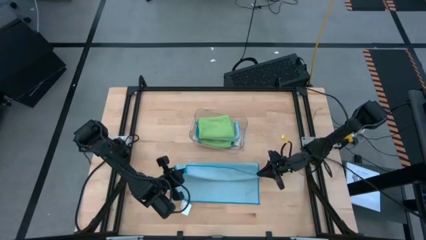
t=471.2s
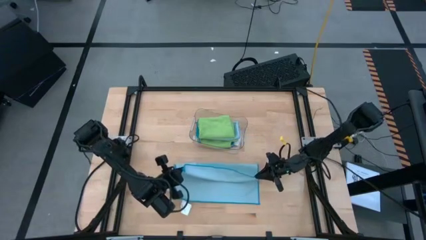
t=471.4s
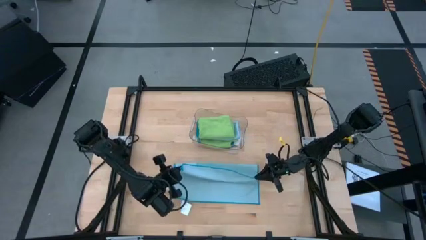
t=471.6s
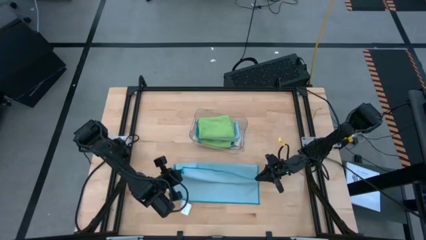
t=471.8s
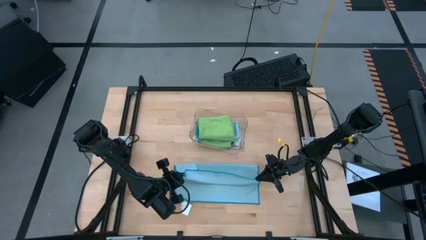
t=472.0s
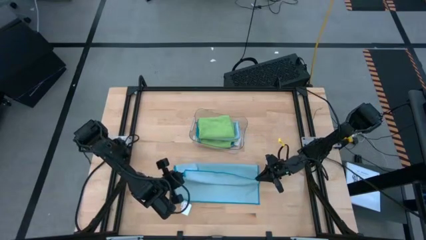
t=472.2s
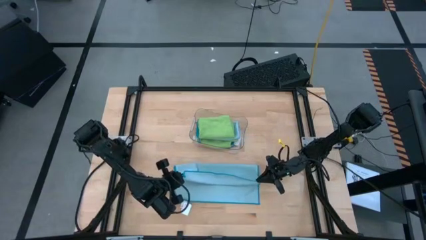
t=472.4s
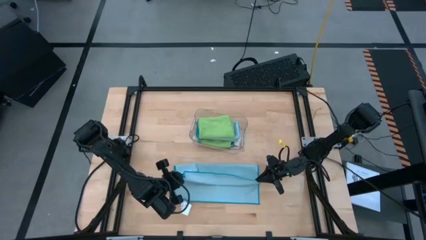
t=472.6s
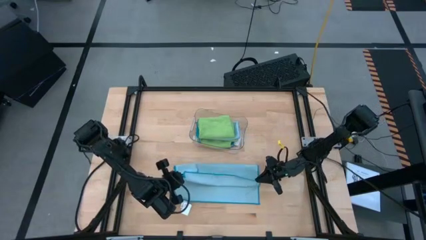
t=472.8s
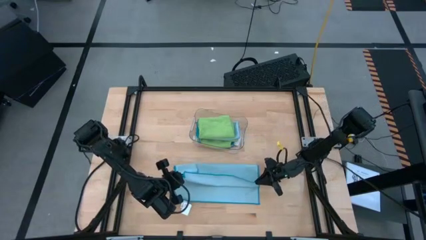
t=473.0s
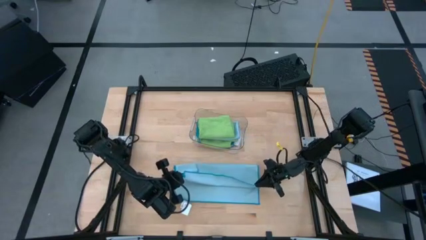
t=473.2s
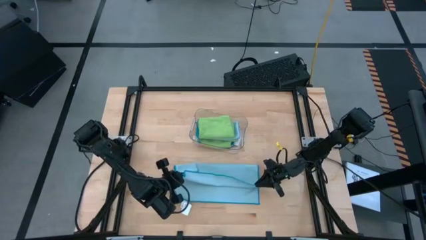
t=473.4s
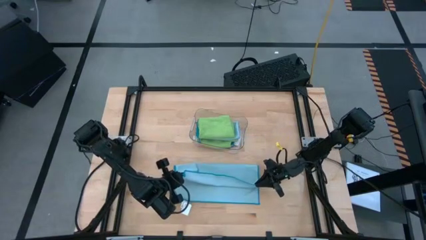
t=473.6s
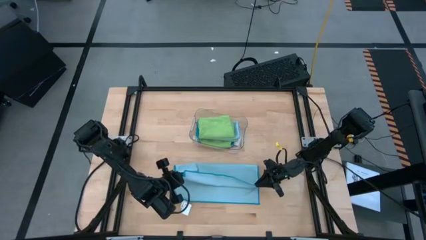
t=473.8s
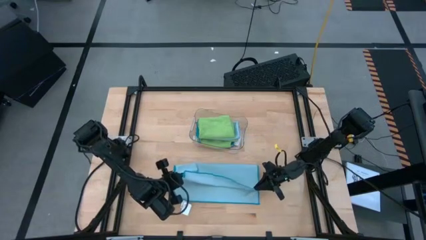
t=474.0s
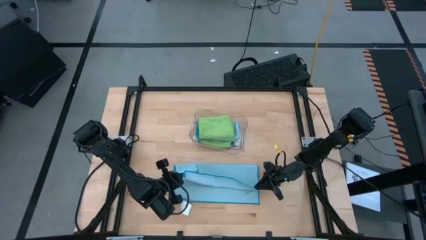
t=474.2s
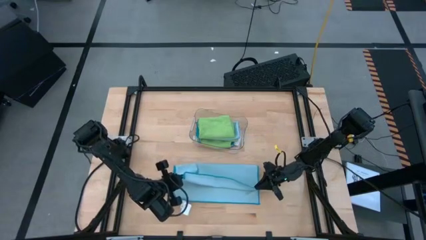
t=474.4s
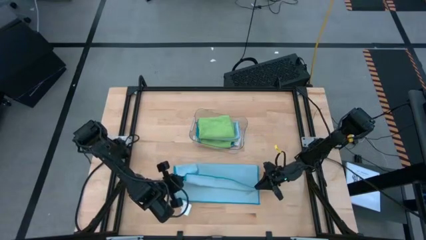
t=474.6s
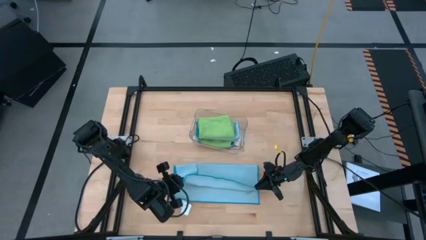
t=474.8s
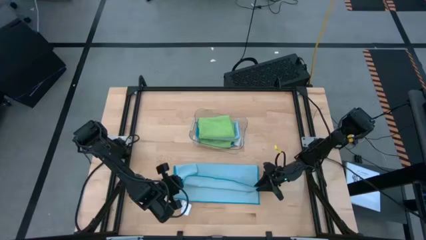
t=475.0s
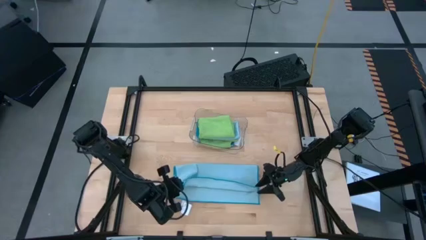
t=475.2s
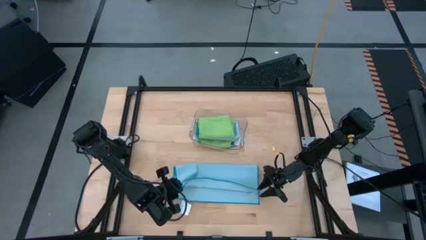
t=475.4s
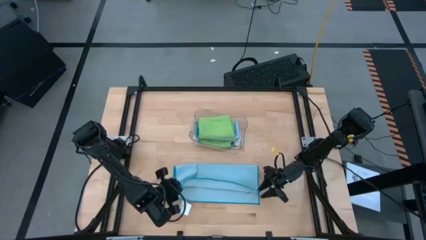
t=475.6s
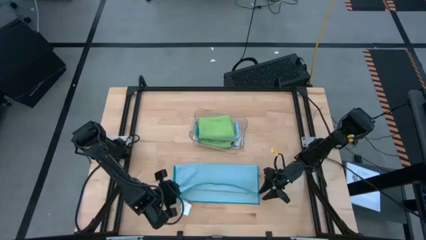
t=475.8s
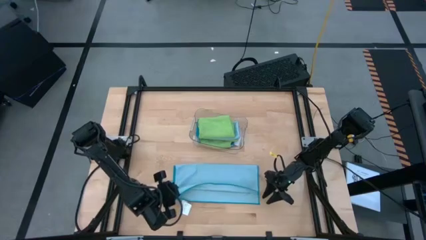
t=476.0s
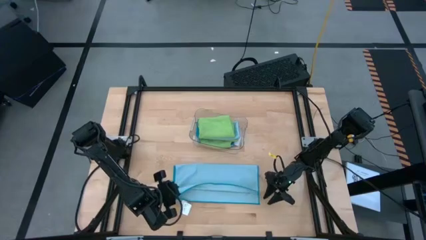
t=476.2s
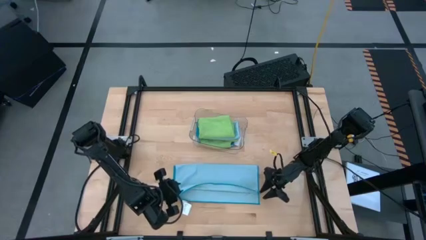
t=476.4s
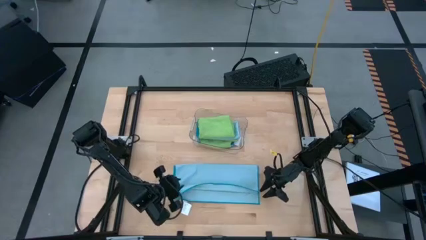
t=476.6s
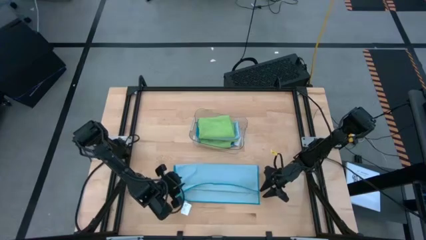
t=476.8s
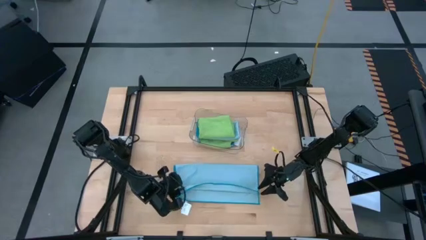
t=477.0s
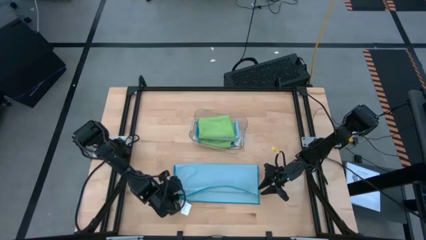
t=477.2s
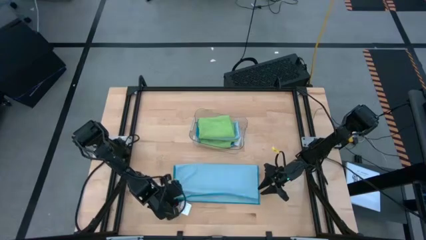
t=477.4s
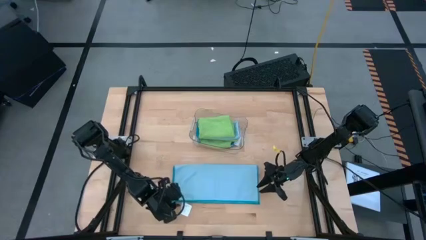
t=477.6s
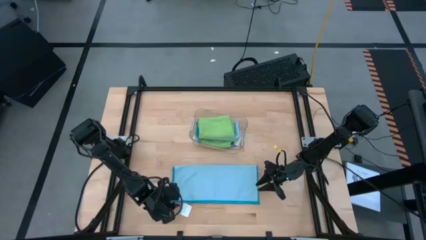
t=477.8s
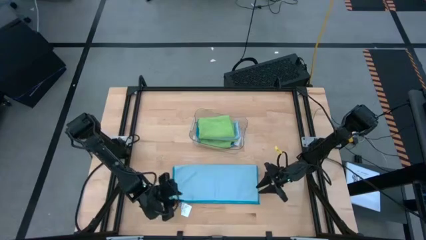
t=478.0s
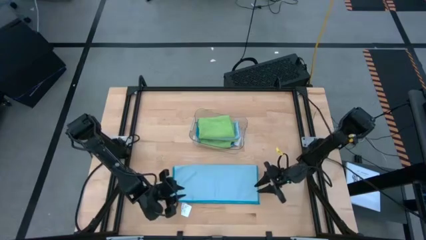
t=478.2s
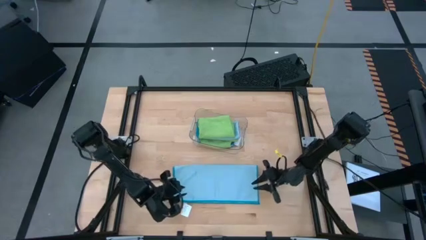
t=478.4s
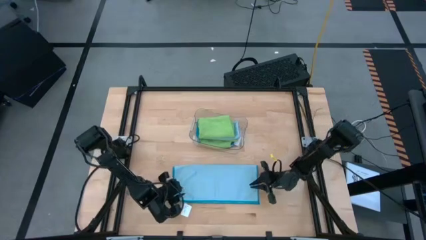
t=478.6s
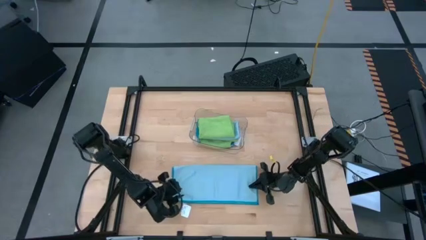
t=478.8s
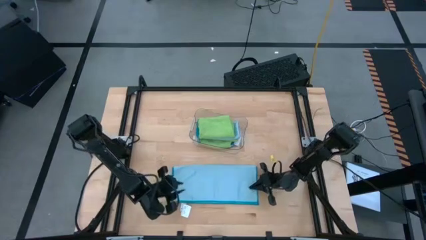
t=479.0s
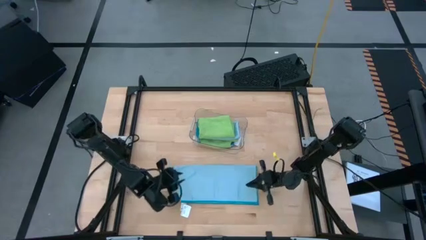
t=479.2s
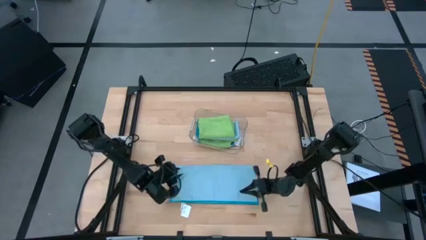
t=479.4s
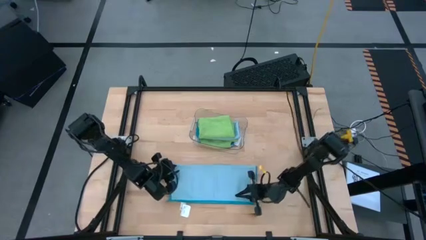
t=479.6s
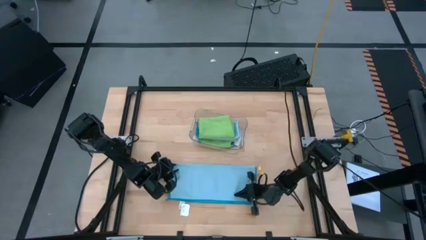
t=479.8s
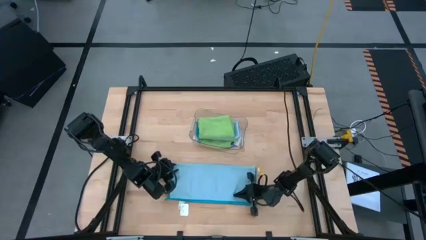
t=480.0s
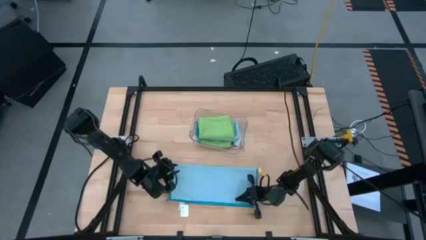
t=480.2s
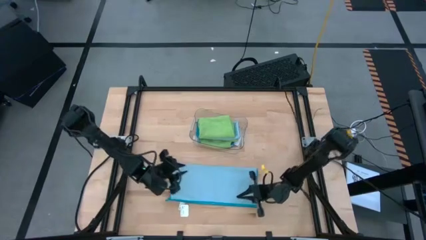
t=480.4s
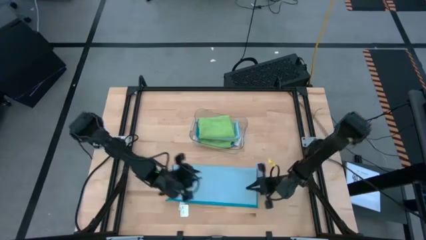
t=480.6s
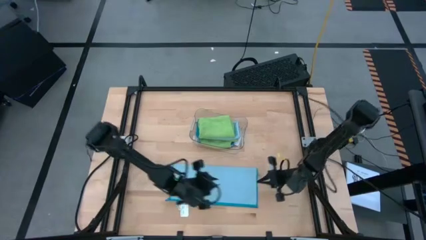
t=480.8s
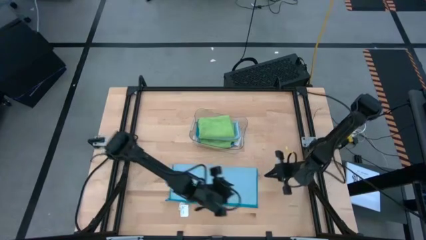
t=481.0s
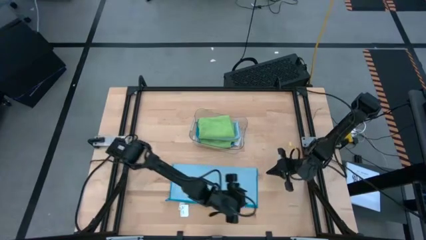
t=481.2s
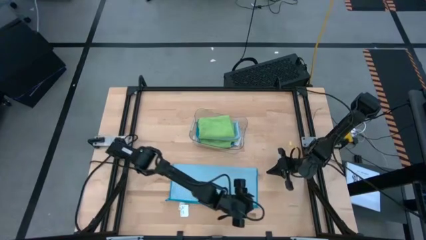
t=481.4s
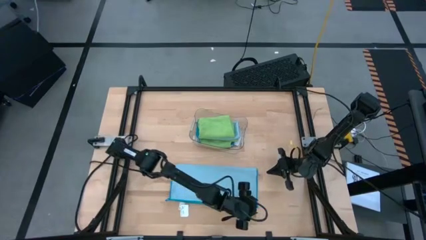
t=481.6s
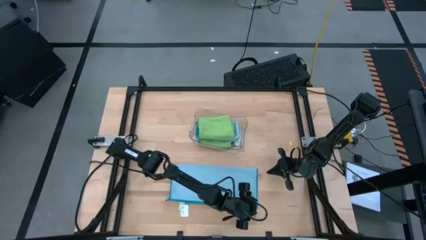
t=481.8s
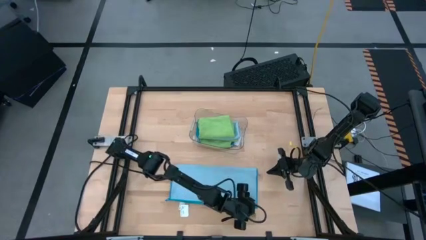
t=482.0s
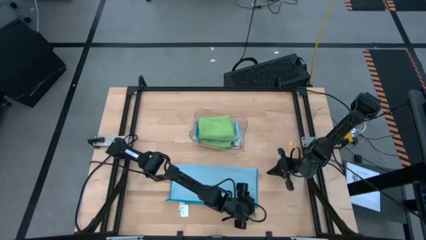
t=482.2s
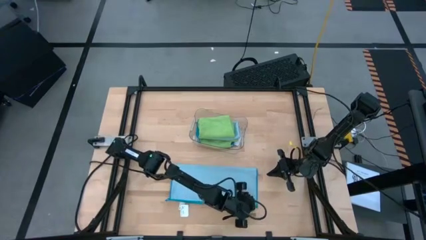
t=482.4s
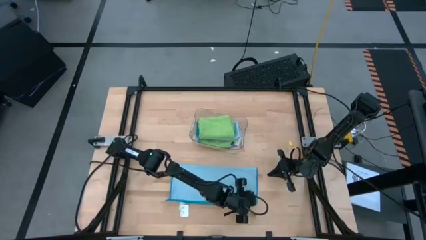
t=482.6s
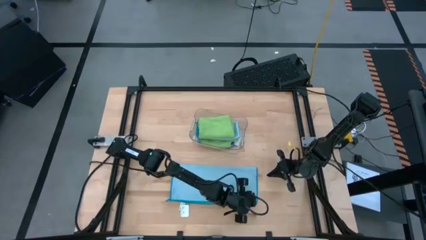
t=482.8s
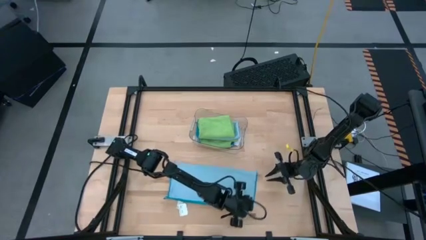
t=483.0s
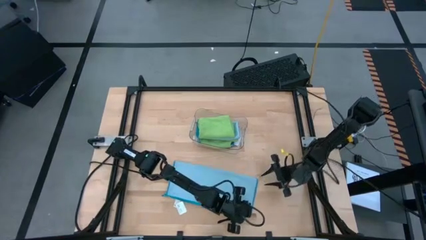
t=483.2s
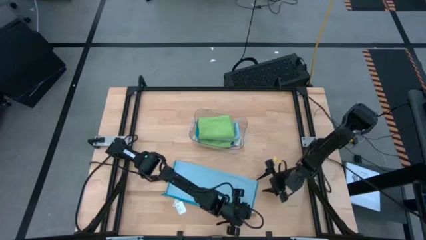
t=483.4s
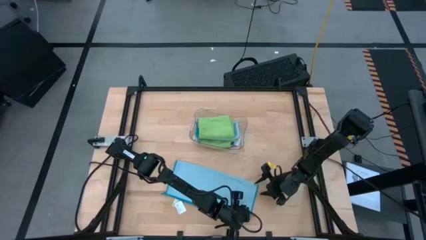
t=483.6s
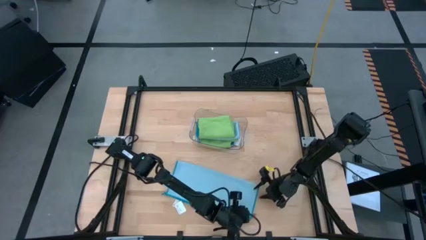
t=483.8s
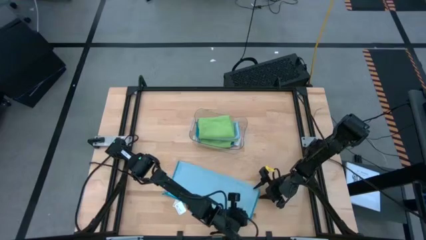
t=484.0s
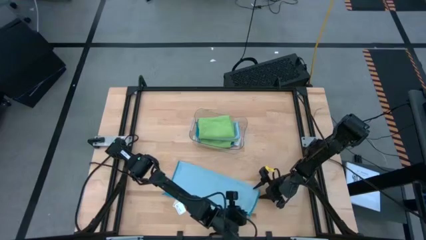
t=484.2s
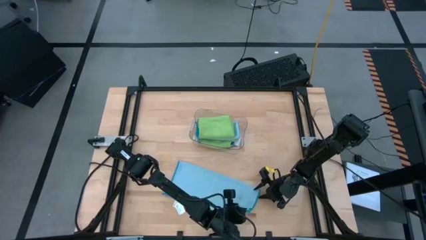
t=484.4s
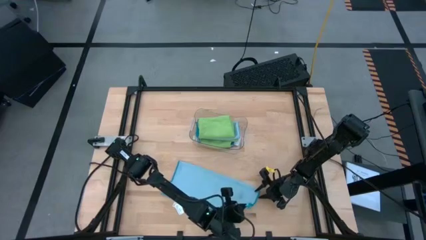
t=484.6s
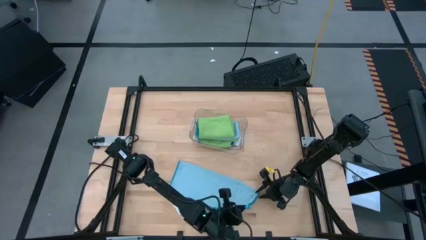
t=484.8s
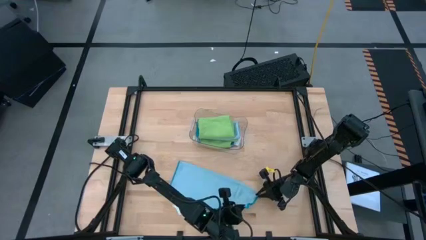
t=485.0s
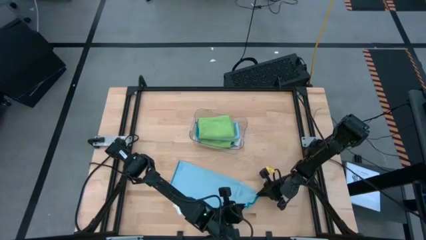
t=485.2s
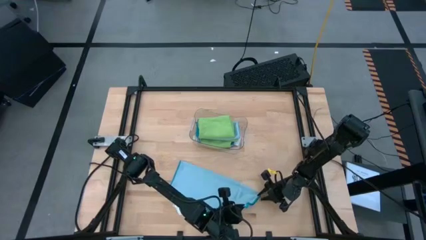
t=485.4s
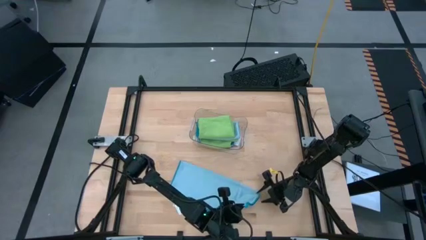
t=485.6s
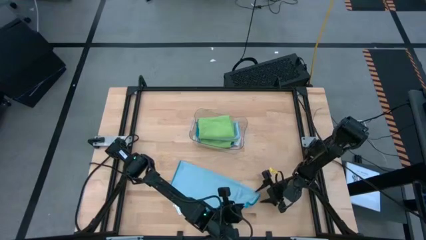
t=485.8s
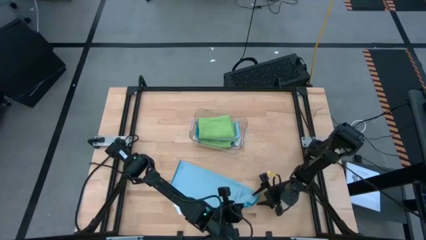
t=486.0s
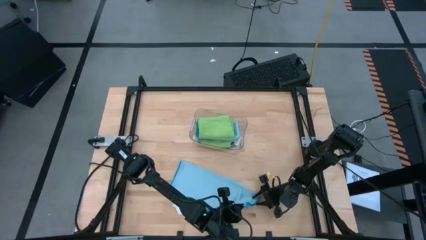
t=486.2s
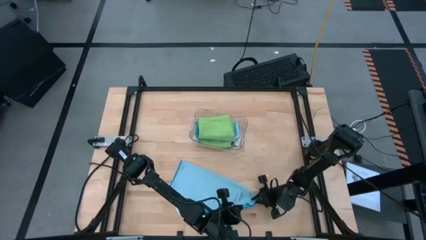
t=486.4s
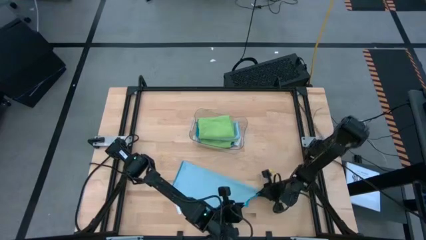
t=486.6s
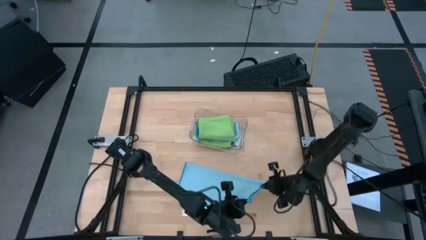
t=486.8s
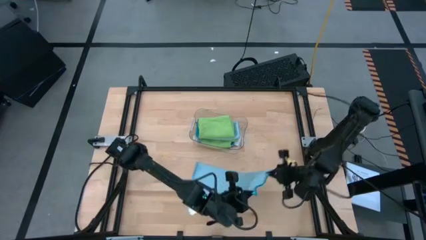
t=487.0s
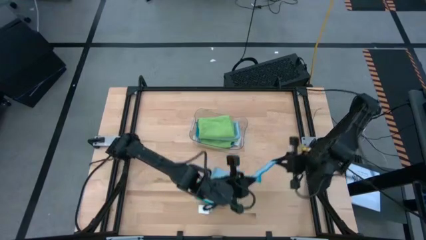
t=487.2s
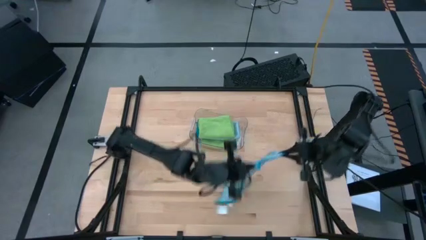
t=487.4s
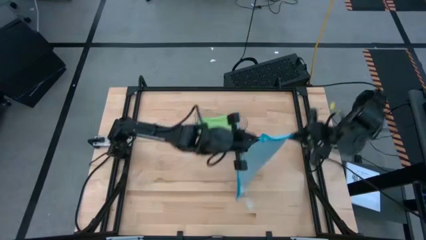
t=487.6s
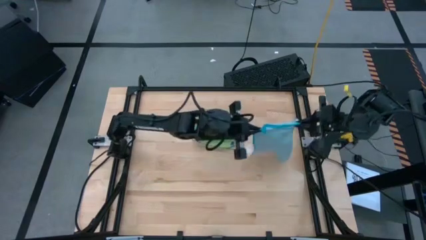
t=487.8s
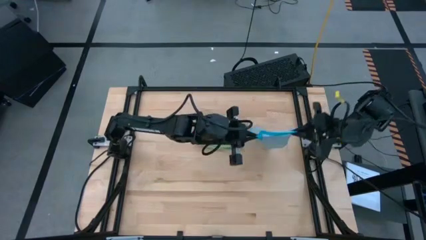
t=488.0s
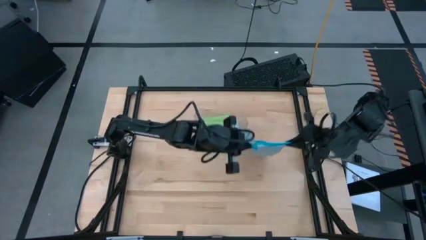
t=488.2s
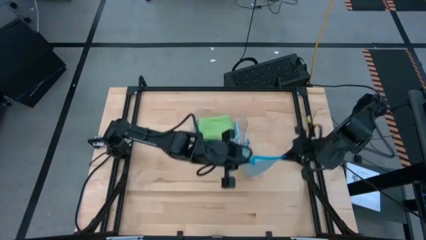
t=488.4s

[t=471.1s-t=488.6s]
Task: Fold microfiber towels
Fold the blue microfiber cloth
